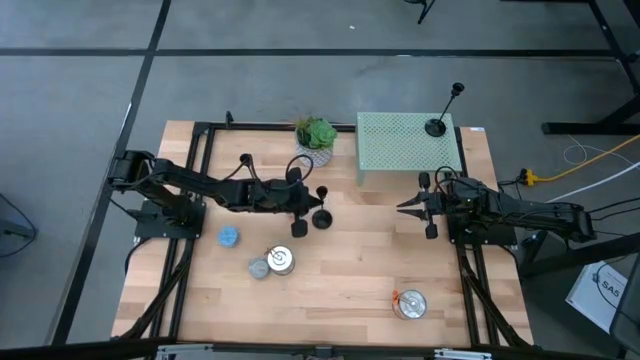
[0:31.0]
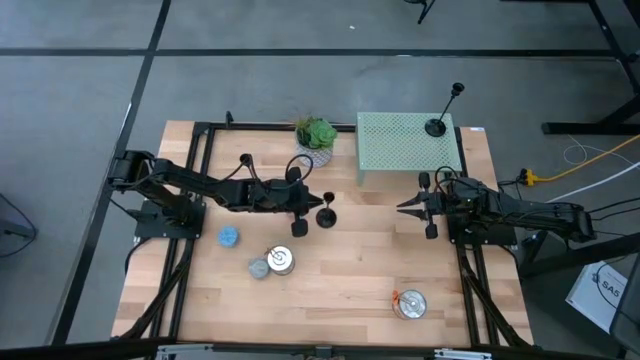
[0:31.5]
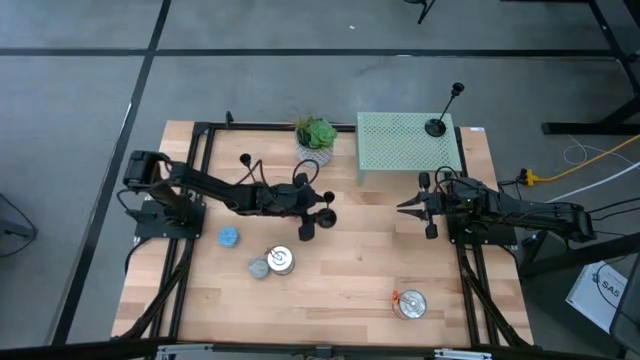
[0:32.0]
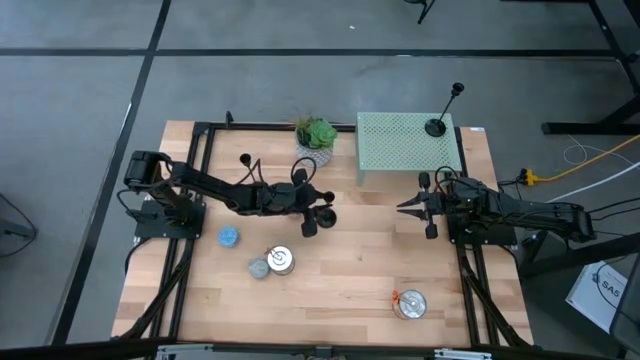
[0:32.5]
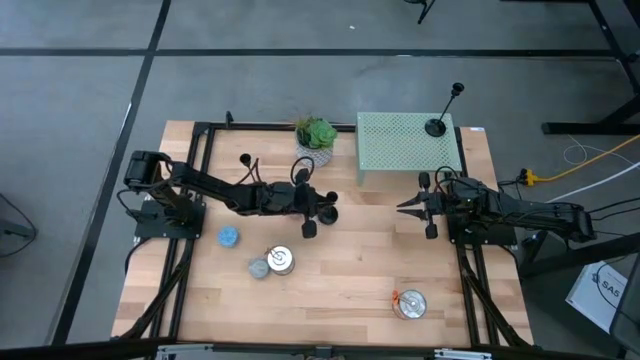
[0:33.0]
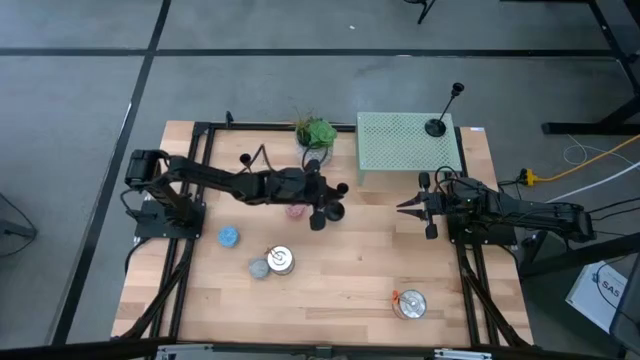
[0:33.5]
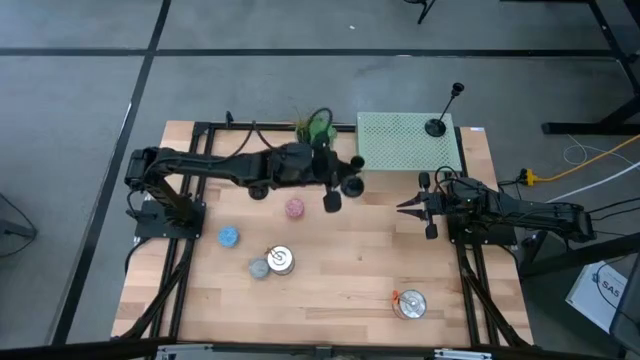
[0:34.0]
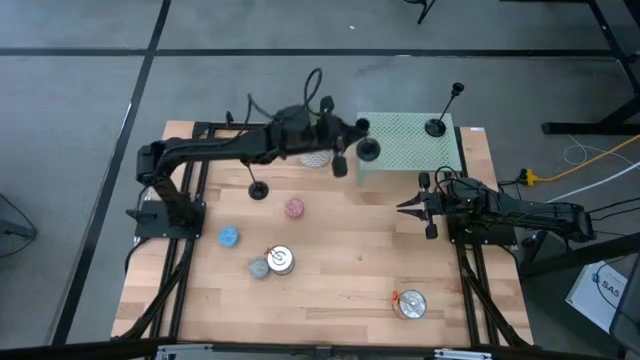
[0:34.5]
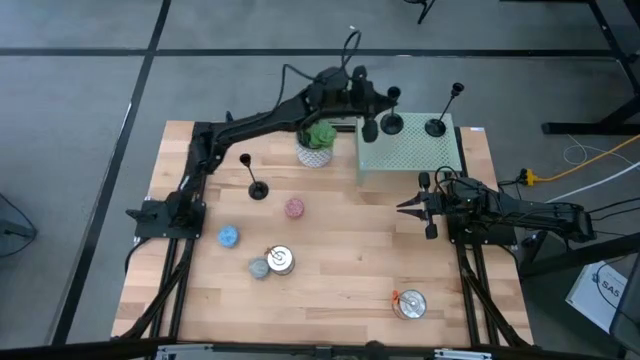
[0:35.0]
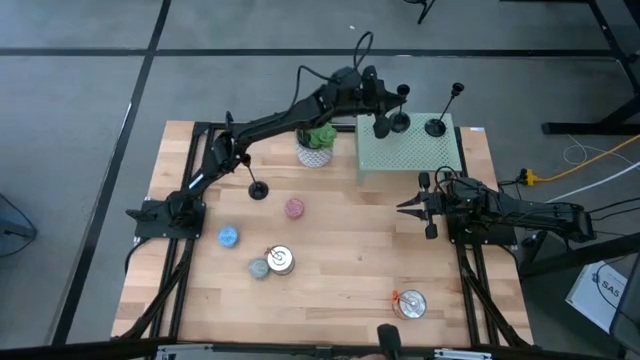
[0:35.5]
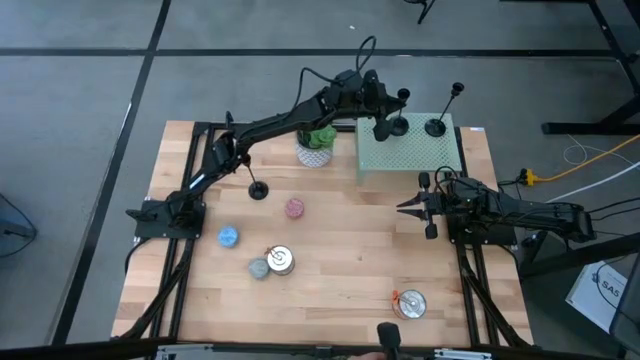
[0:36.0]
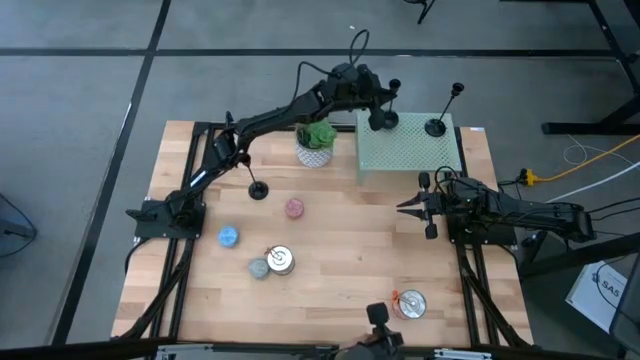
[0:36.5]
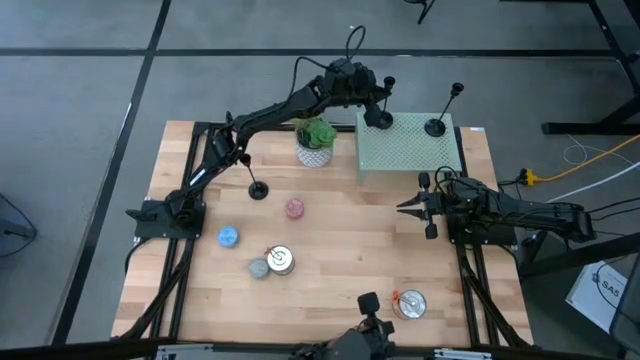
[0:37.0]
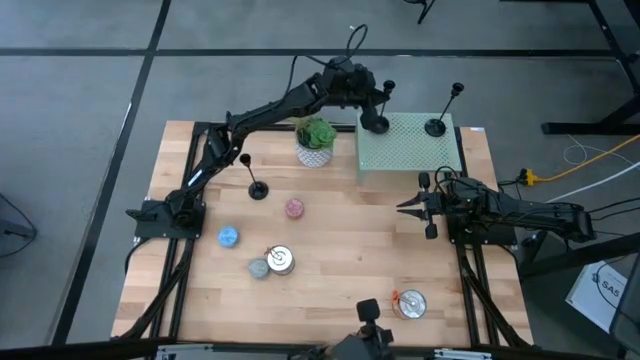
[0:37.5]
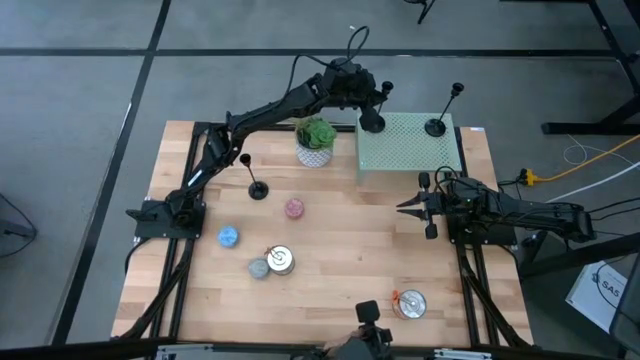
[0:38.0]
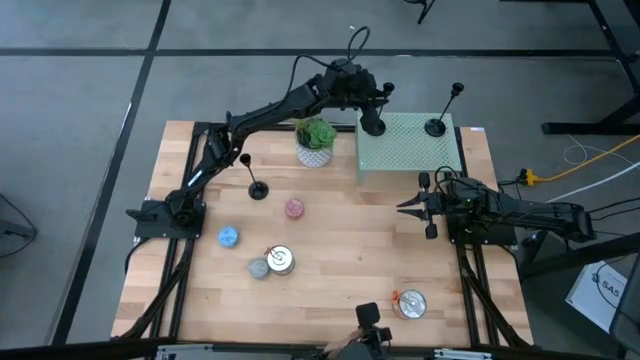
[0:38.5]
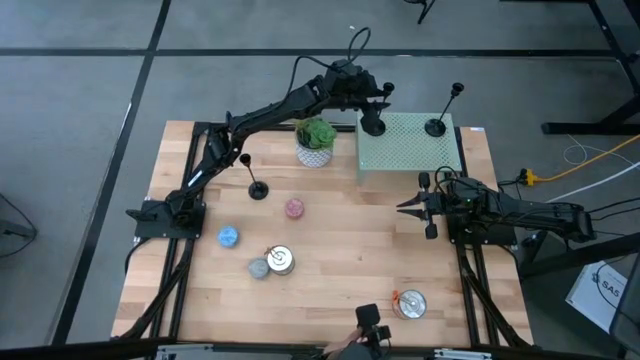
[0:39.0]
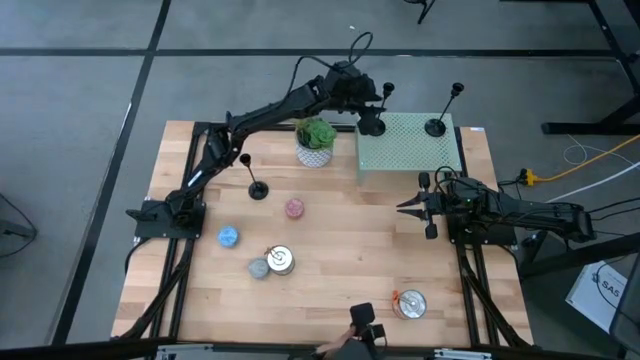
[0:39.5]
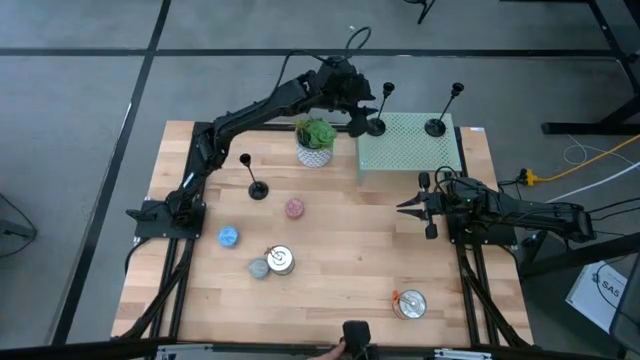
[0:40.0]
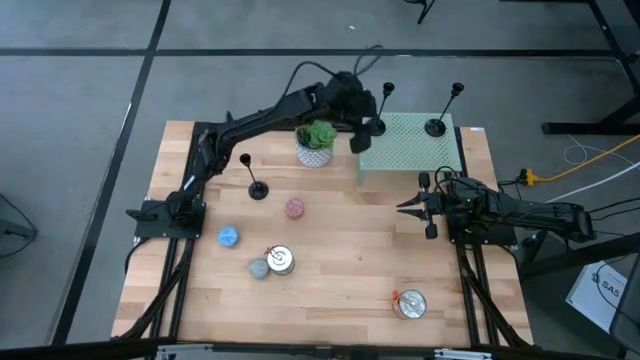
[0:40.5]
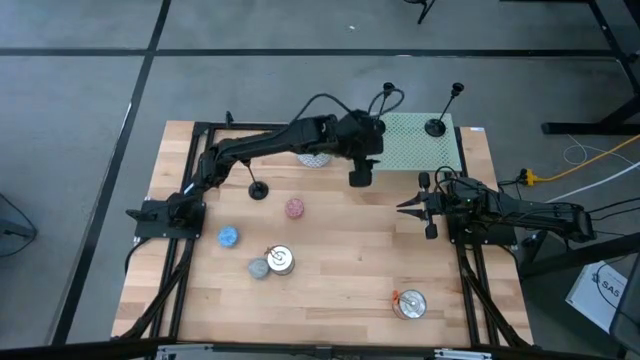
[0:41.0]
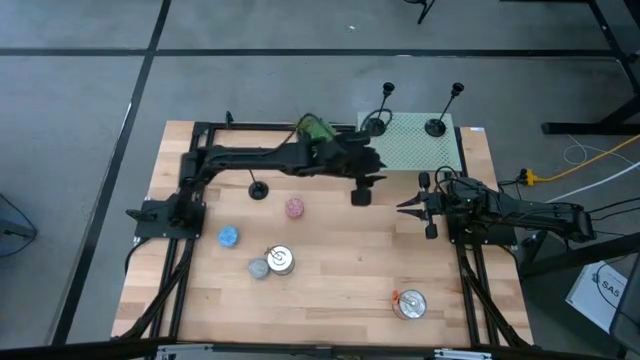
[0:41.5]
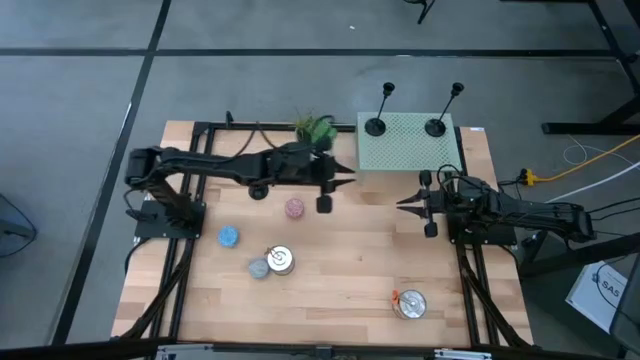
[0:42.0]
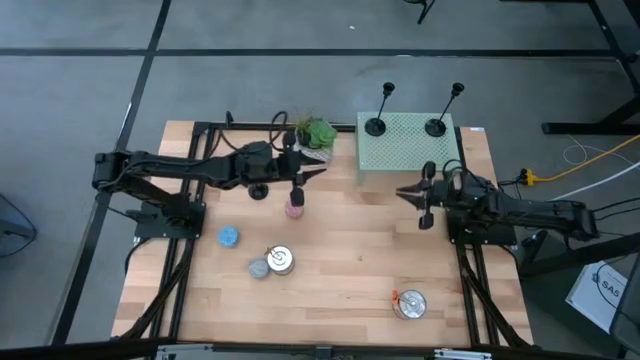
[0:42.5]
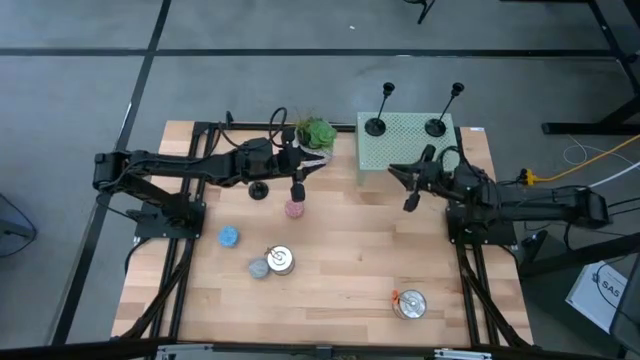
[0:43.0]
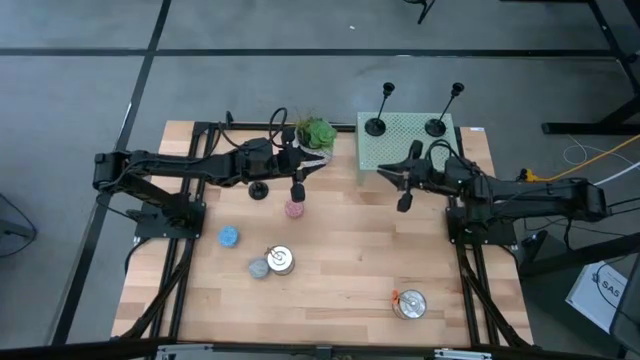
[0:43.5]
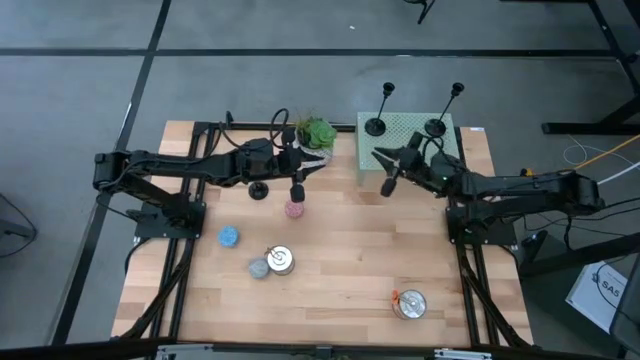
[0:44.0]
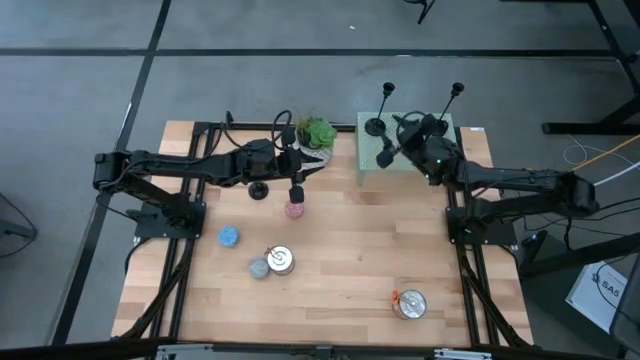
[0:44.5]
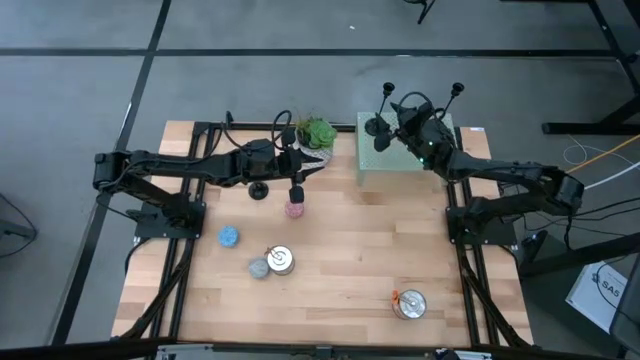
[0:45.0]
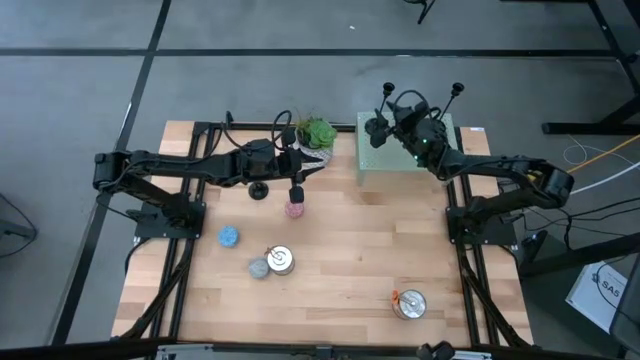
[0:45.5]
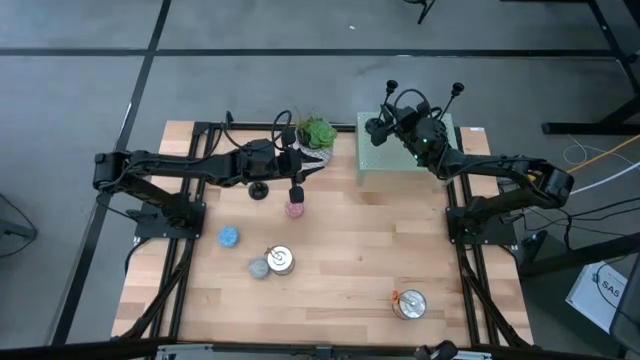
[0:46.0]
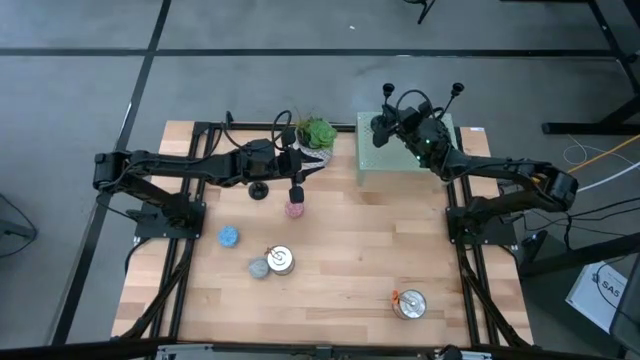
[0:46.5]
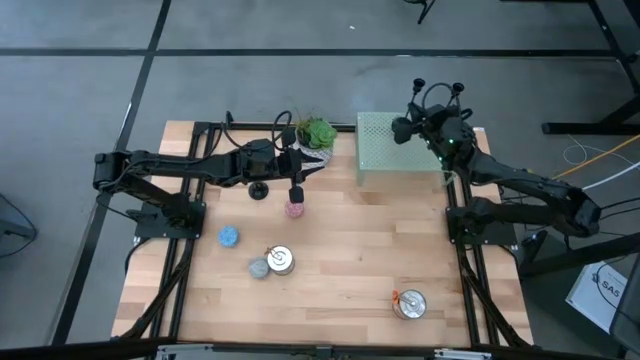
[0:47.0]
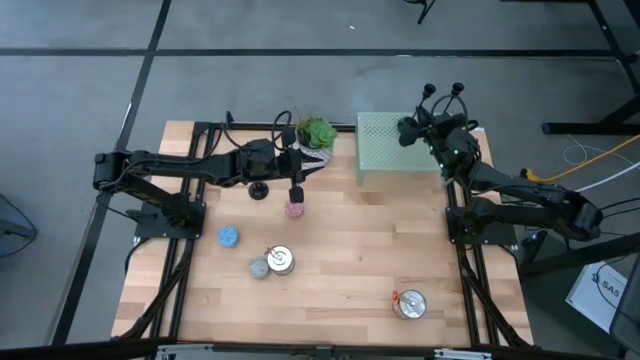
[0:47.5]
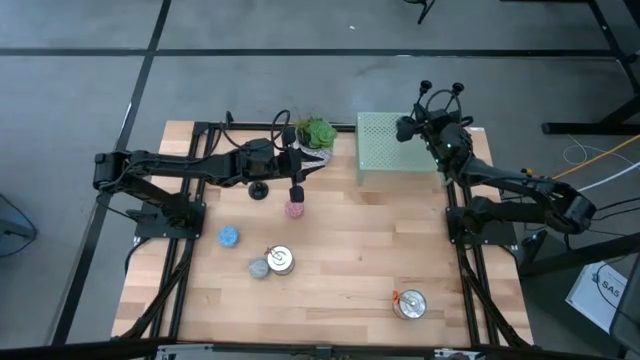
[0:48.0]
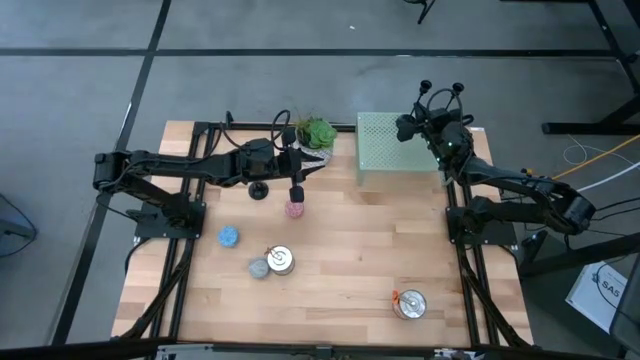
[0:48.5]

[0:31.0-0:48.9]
Task: Pick & Place candle stick holders
Put the right black candle holder and aligned with other black candle holder on the shelf

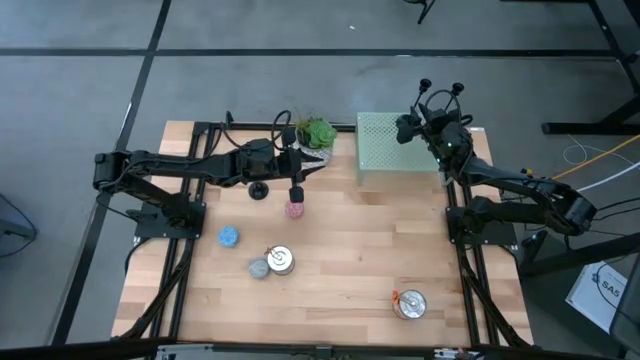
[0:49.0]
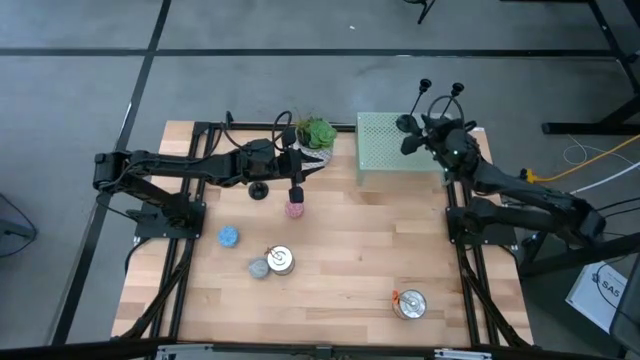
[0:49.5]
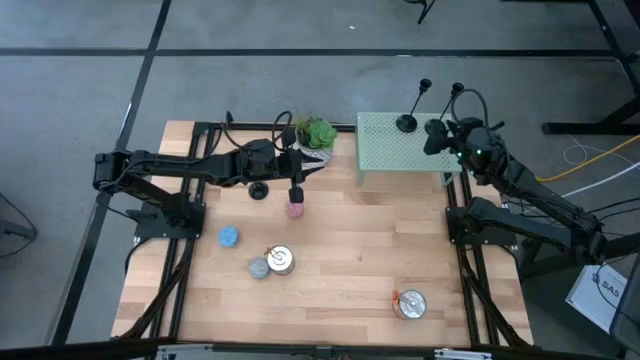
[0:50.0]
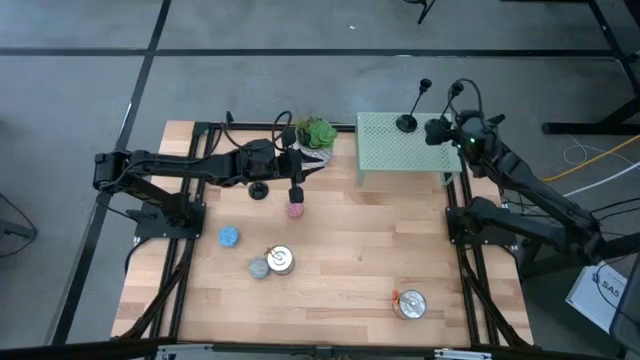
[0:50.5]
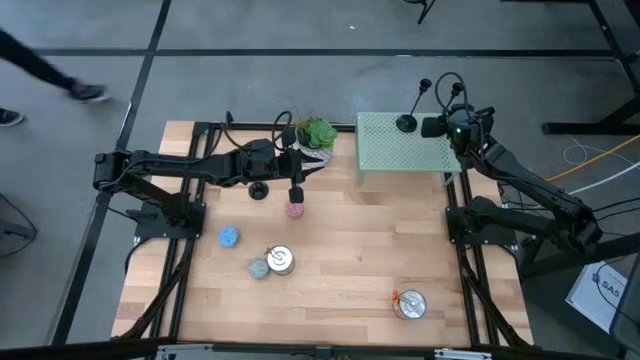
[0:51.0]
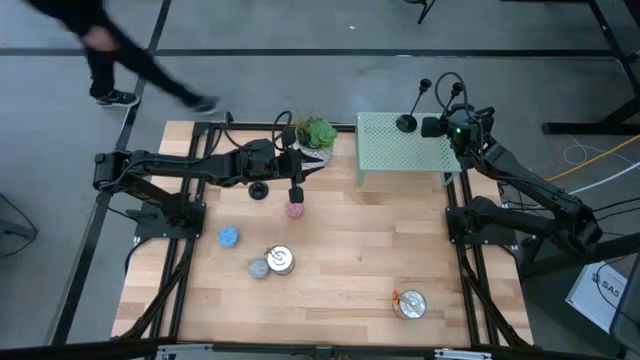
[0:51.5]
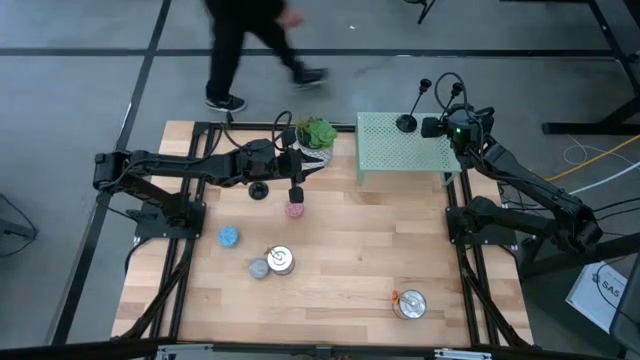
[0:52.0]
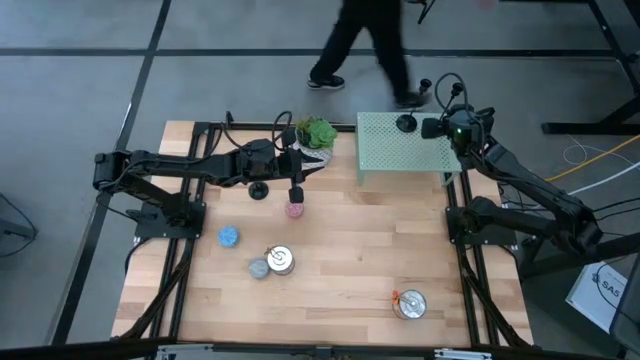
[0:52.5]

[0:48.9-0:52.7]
Adjust the black candle holder on the shelf
